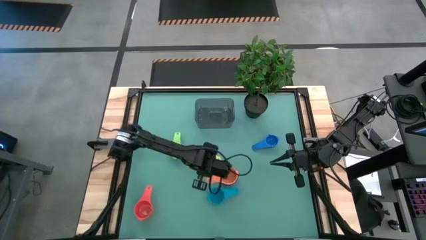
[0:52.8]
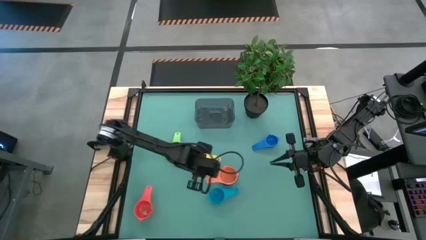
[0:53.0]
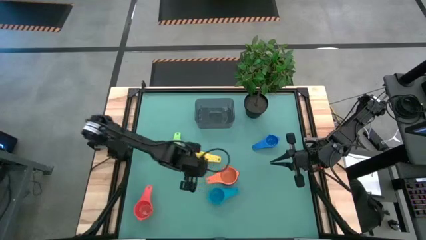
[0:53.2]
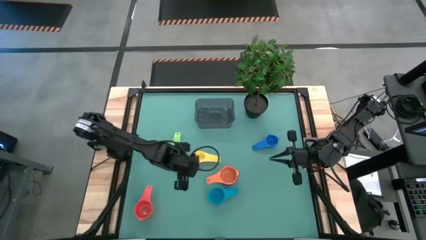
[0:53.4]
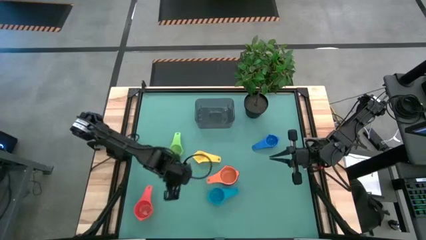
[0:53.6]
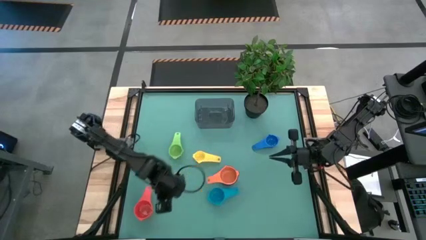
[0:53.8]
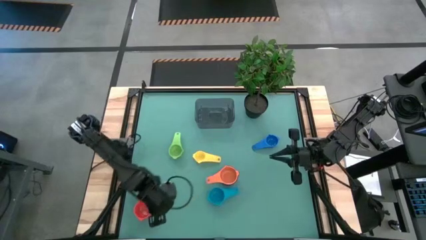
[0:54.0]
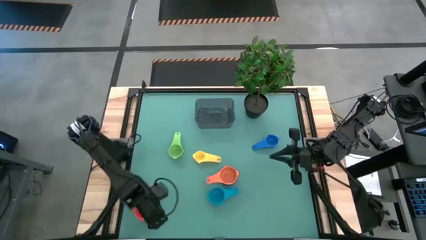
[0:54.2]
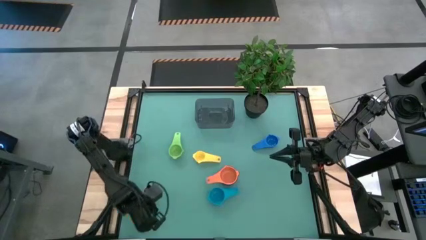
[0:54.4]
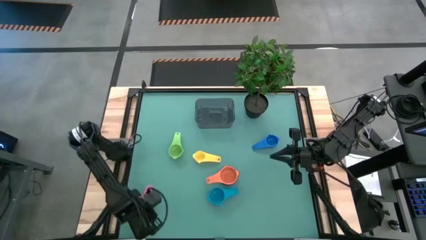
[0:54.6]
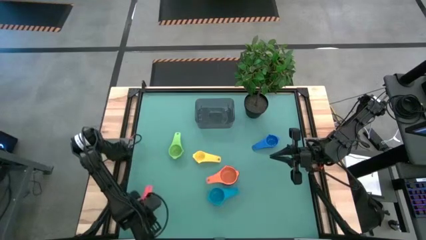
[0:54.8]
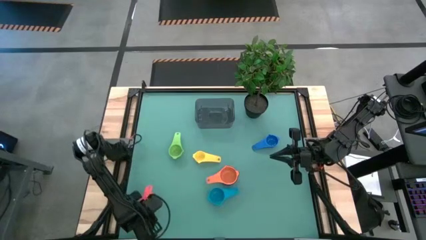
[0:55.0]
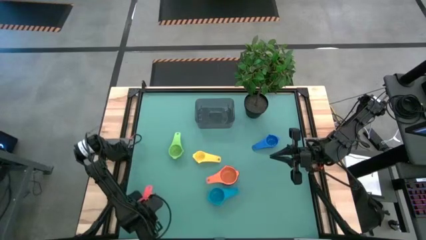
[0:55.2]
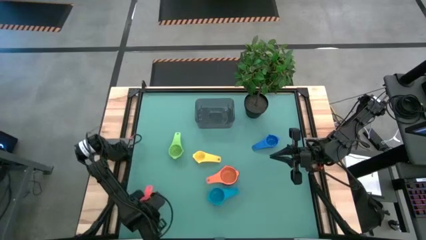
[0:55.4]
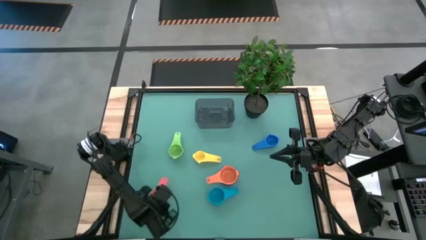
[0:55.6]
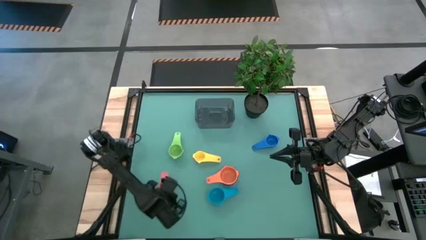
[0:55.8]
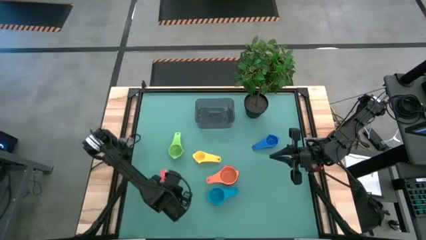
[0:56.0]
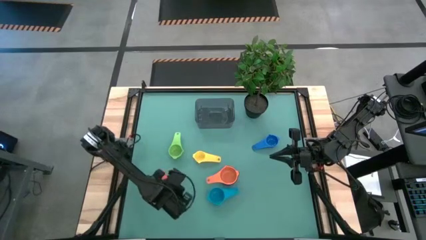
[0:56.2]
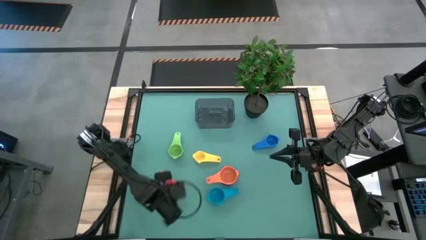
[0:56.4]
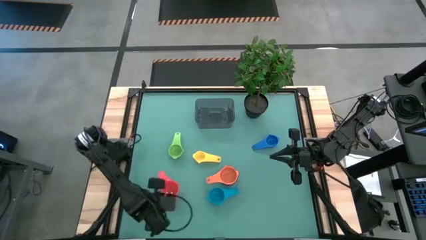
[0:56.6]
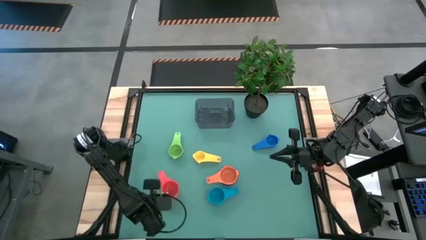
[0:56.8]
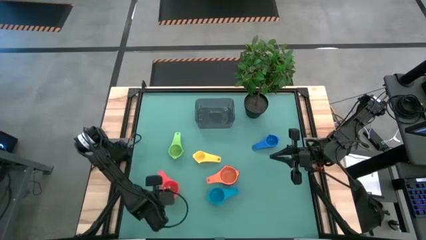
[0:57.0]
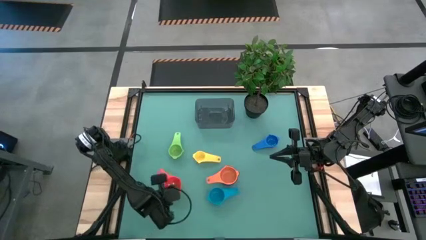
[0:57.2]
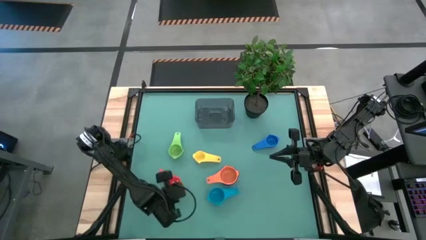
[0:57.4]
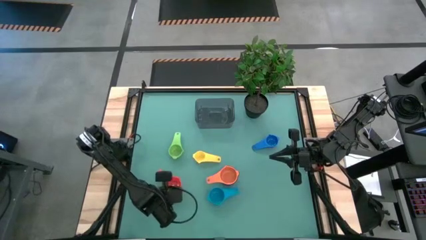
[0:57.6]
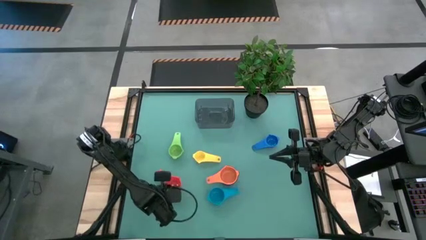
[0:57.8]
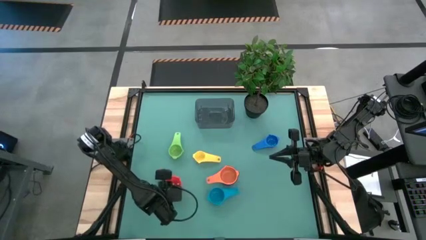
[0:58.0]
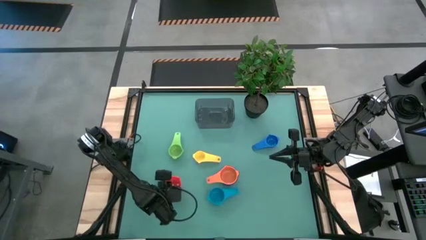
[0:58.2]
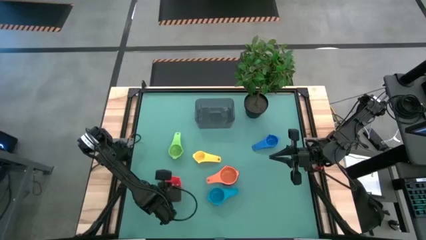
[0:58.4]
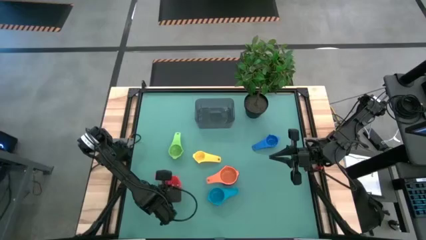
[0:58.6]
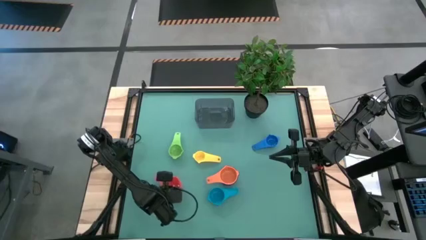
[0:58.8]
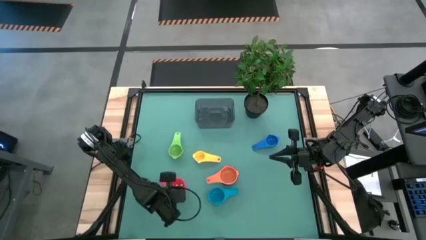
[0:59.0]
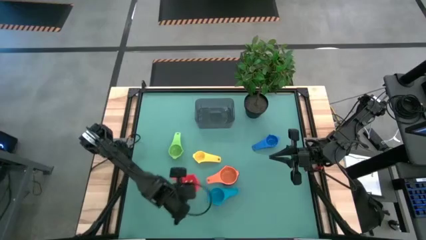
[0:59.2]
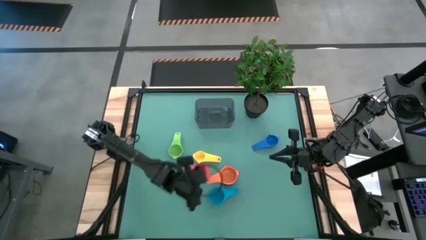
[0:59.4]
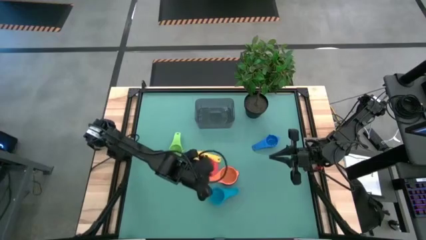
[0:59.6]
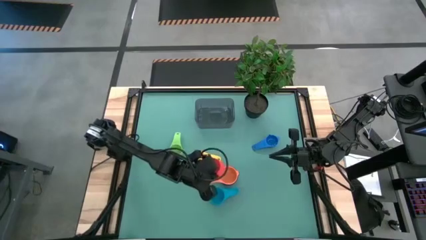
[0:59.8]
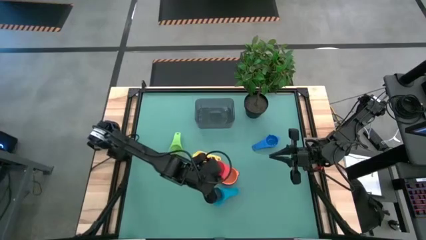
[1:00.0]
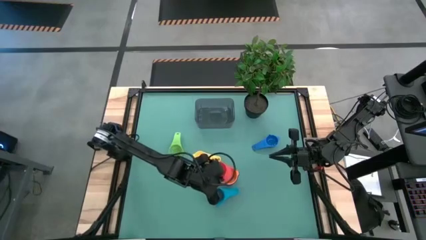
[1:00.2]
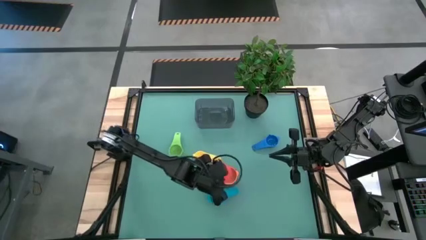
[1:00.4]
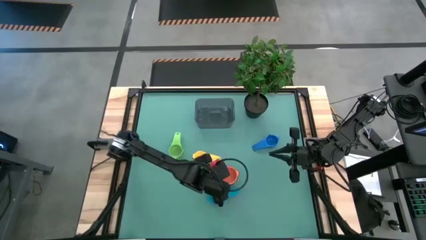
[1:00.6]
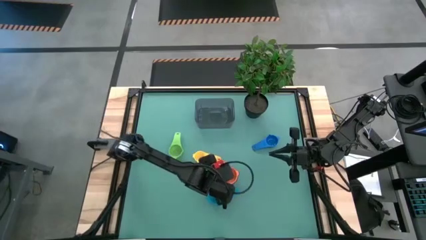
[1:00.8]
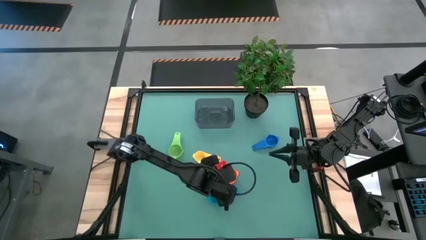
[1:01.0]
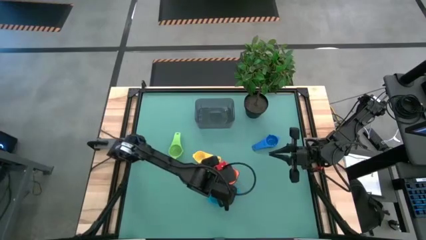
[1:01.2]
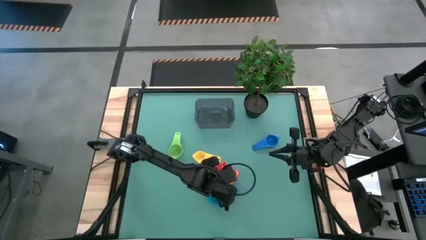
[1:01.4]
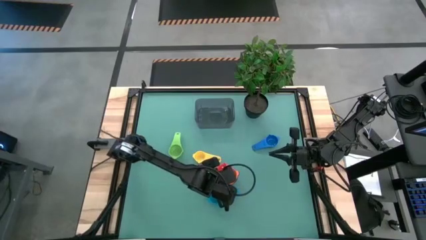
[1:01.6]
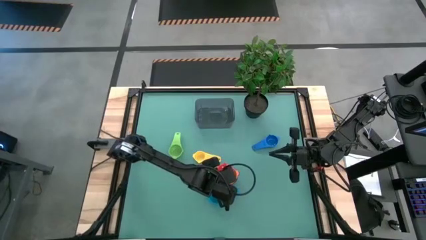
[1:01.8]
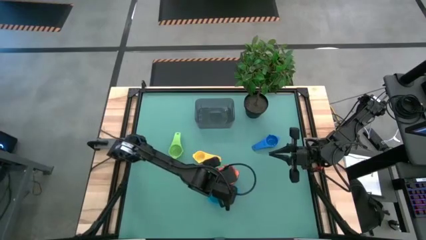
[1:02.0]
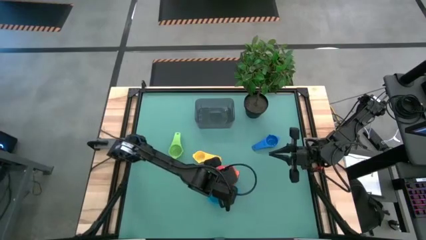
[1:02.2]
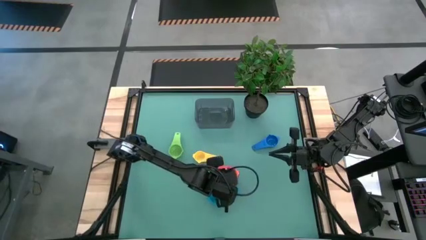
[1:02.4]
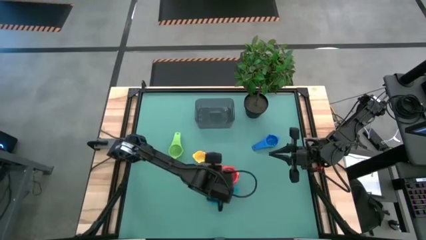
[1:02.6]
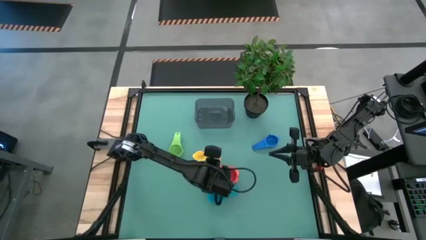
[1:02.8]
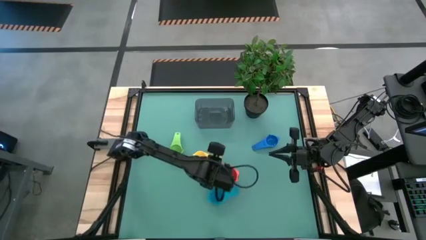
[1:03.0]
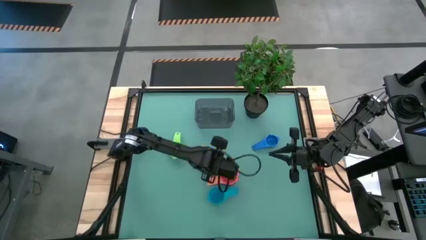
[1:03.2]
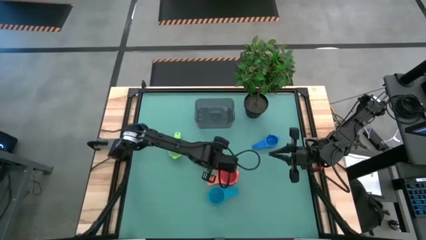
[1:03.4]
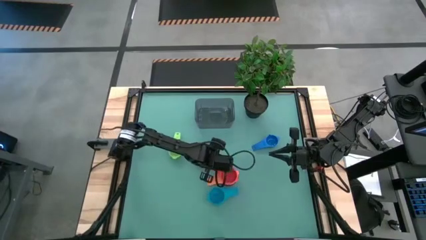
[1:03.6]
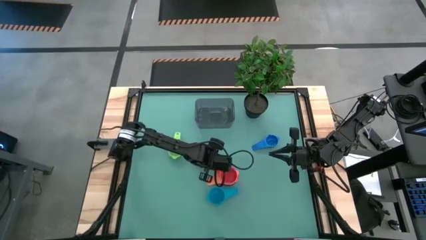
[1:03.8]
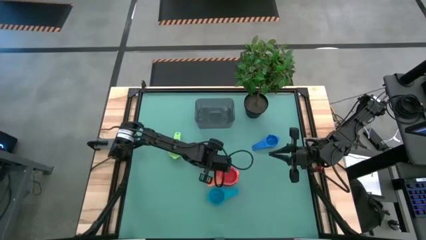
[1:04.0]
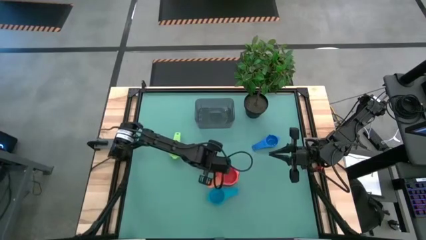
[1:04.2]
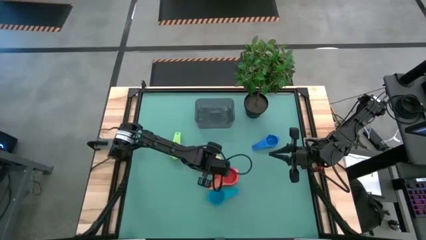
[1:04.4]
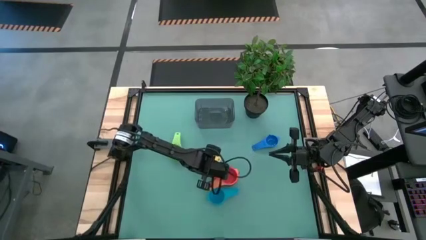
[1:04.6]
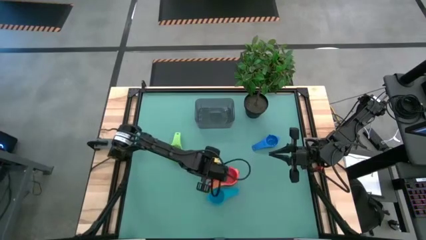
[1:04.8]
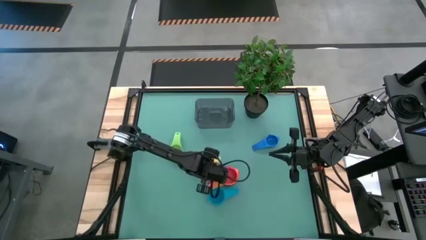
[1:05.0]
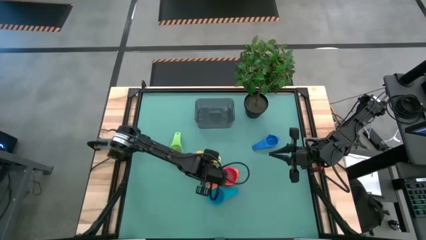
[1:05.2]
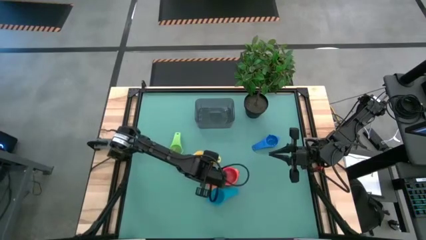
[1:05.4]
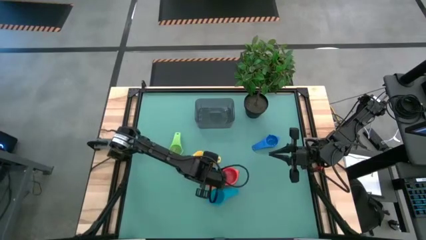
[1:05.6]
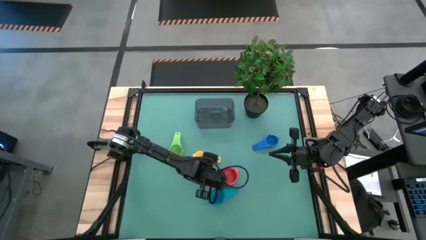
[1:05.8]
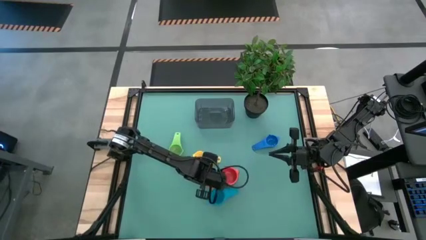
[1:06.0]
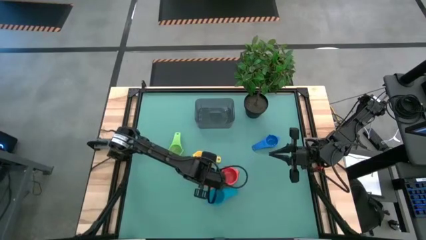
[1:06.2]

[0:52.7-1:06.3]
Task: Nest measuring cups in basket
Stack the red measuring cup into the orange measuring cup

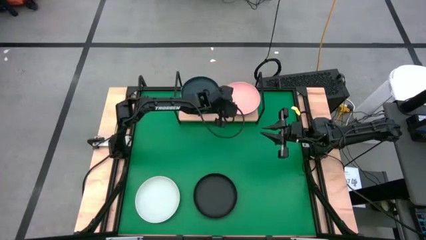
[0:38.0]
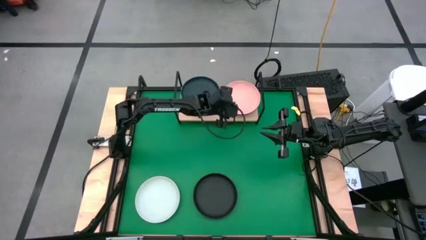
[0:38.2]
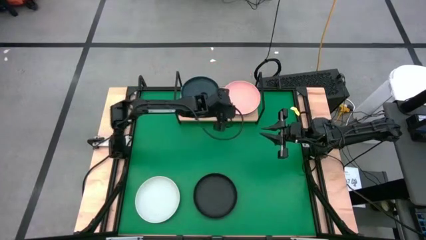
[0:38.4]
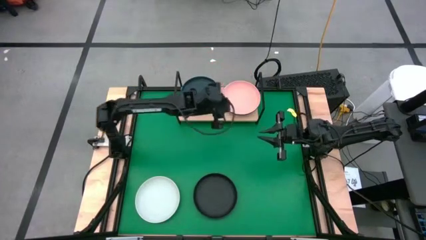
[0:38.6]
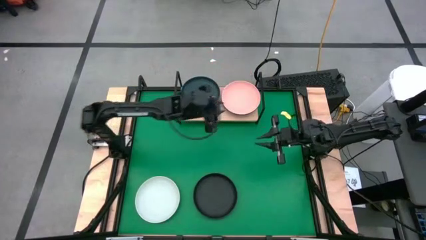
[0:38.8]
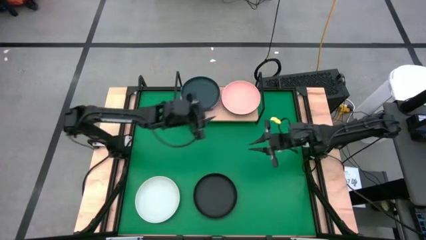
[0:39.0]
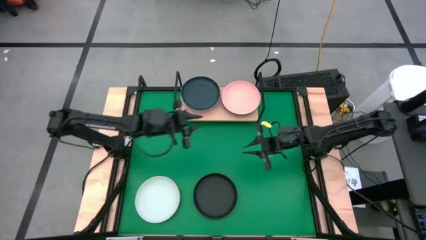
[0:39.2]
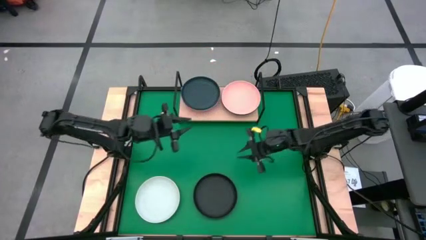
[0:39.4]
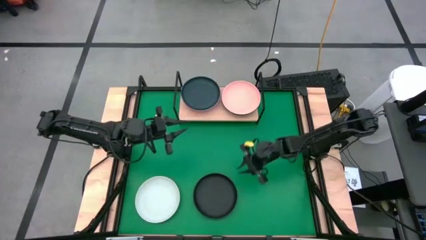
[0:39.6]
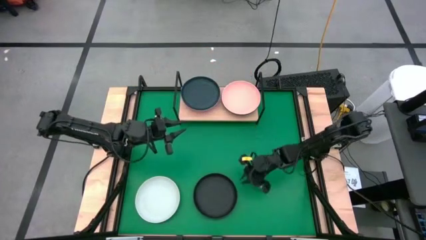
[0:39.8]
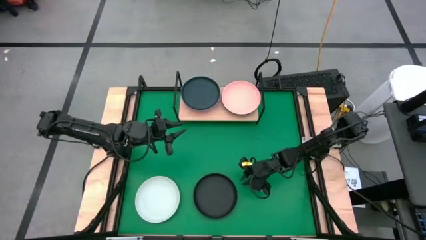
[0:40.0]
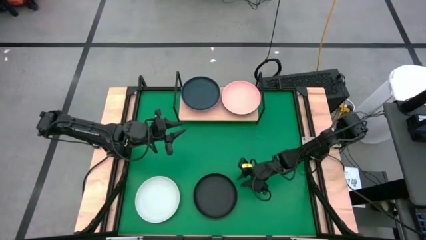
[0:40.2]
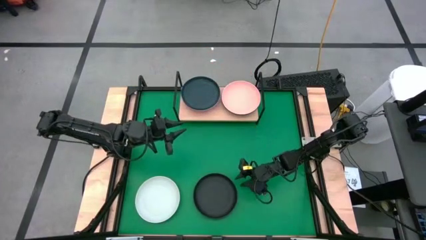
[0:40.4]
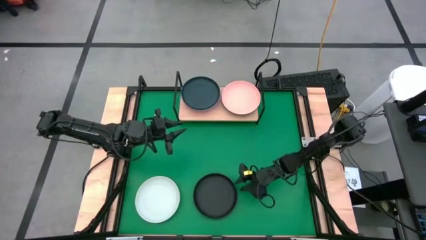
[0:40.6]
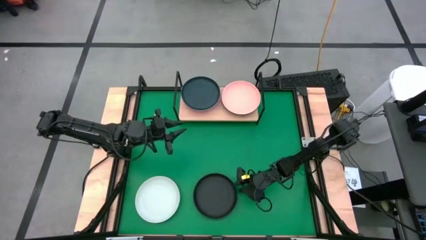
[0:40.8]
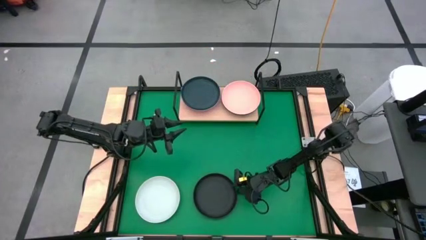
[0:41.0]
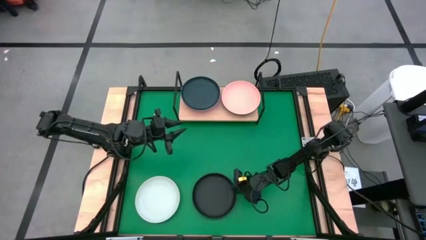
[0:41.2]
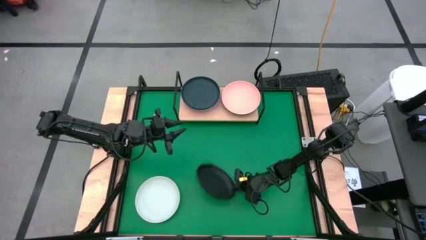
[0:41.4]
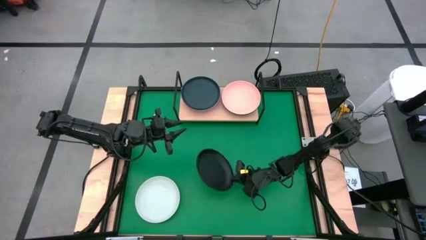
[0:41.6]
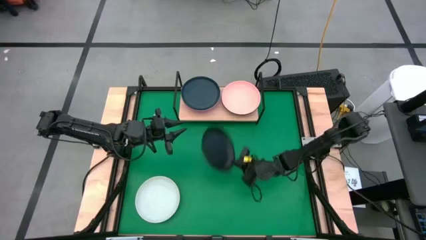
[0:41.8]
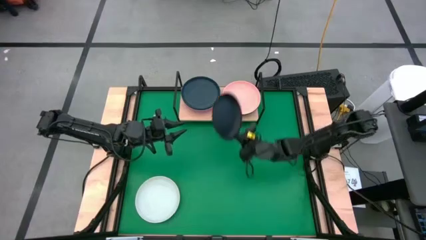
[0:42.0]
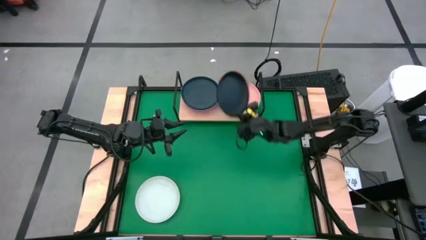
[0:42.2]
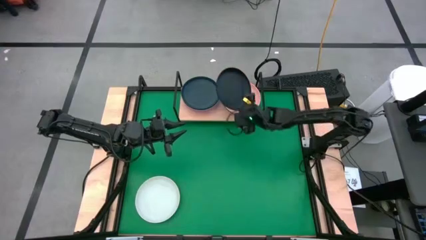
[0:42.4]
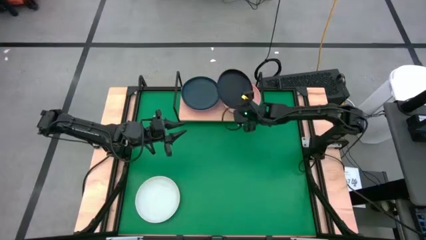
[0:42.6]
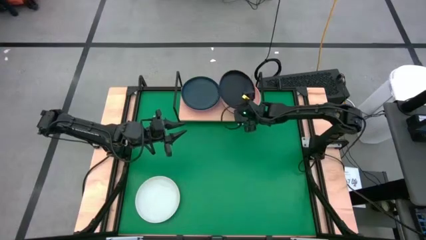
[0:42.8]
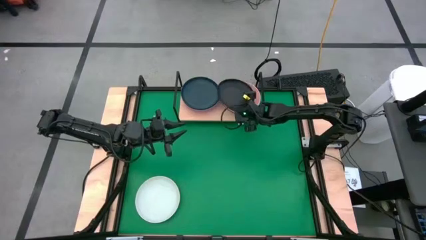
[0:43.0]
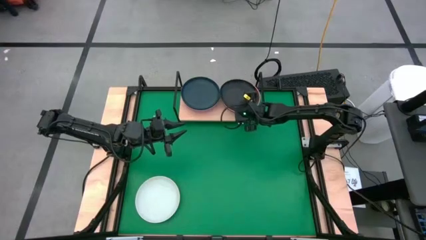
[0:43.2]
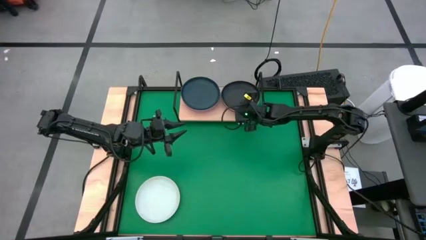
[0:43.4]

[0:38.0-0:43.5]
Task: Place and stack plates onto a shelf
Stack the black plate on top of the light pink plate on the shelf
